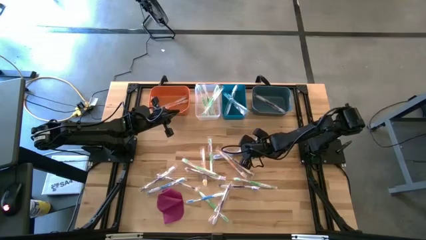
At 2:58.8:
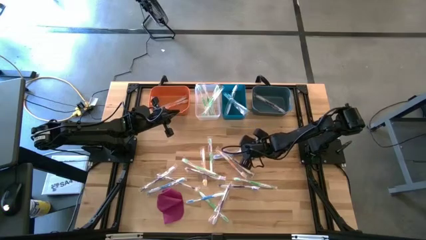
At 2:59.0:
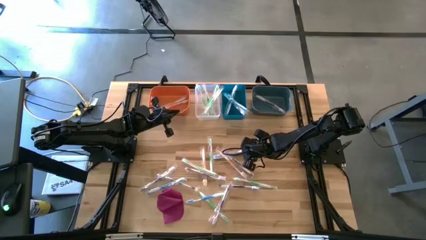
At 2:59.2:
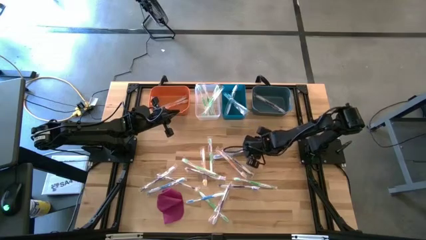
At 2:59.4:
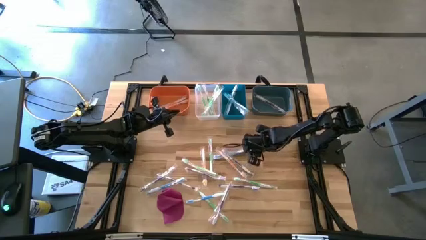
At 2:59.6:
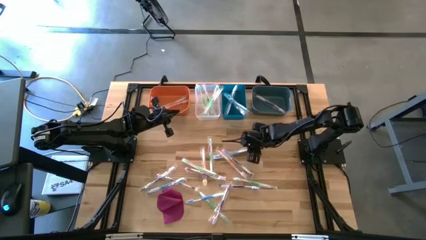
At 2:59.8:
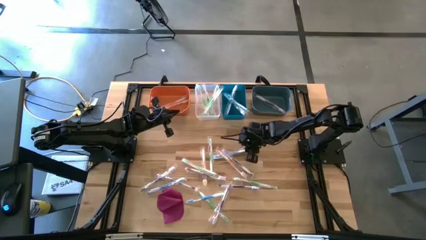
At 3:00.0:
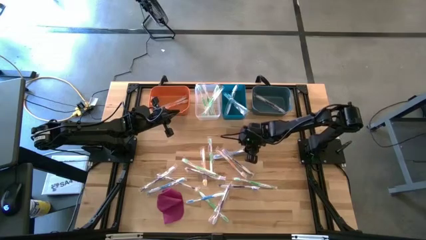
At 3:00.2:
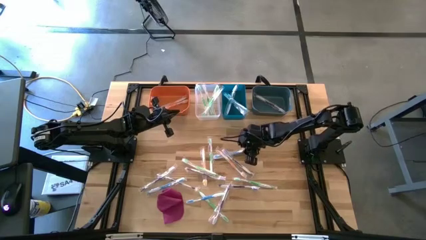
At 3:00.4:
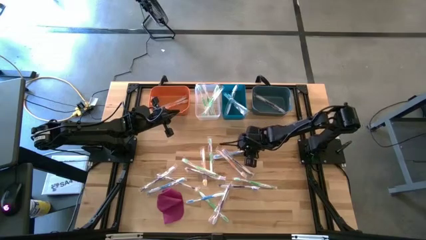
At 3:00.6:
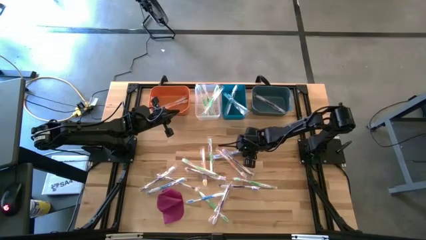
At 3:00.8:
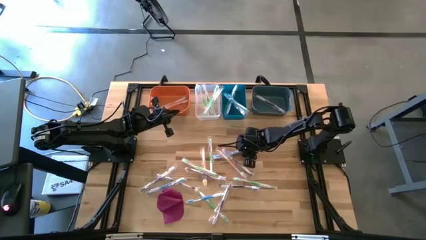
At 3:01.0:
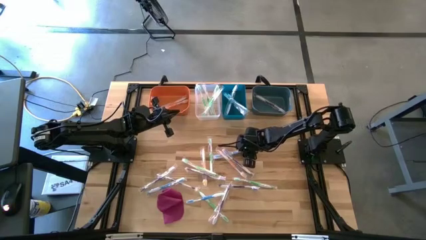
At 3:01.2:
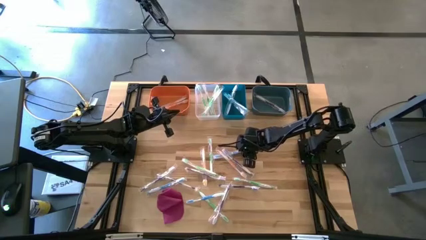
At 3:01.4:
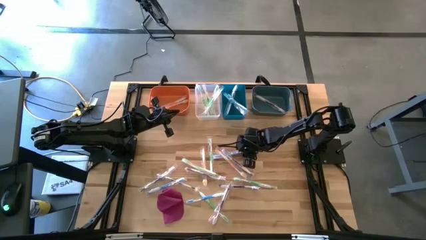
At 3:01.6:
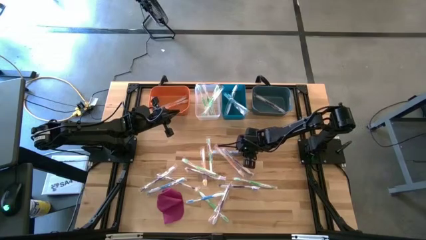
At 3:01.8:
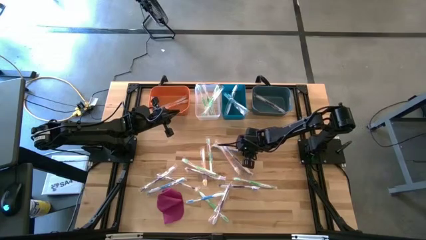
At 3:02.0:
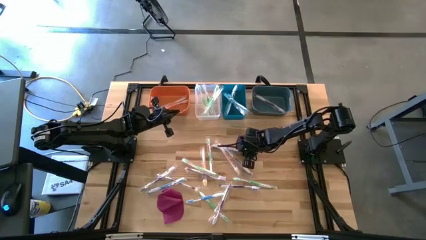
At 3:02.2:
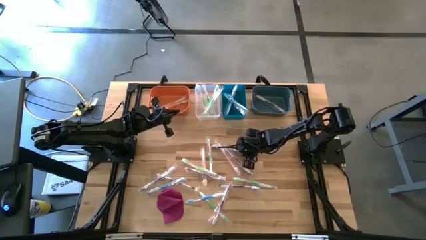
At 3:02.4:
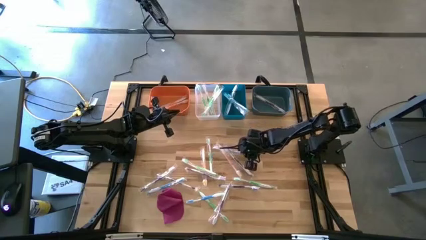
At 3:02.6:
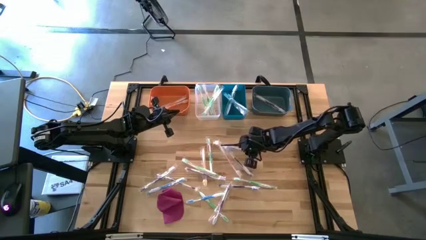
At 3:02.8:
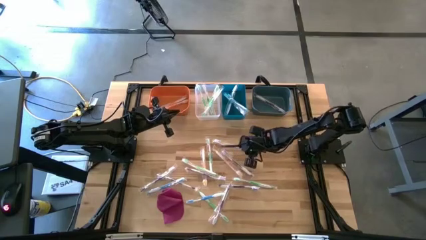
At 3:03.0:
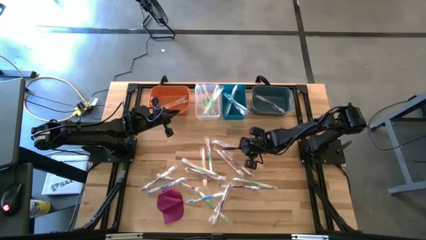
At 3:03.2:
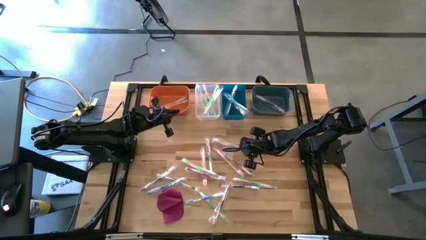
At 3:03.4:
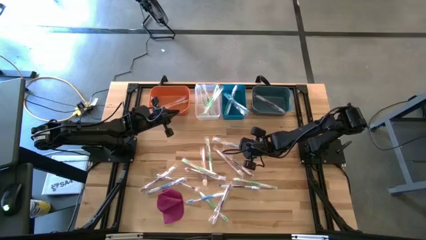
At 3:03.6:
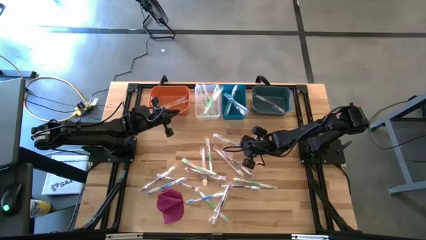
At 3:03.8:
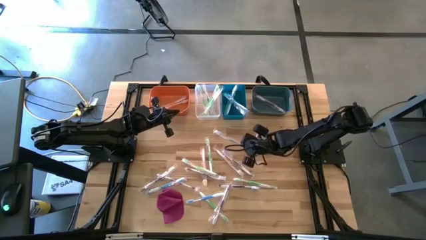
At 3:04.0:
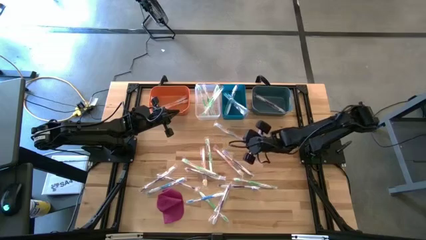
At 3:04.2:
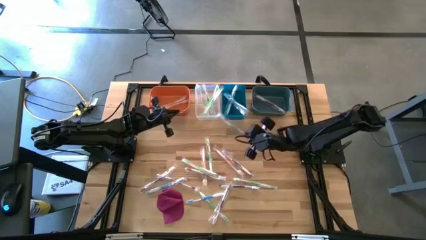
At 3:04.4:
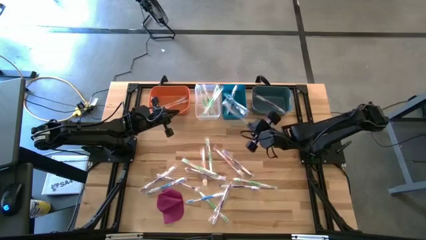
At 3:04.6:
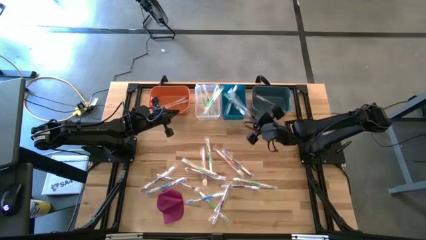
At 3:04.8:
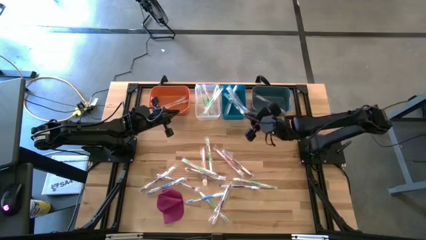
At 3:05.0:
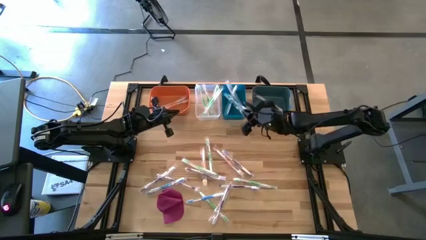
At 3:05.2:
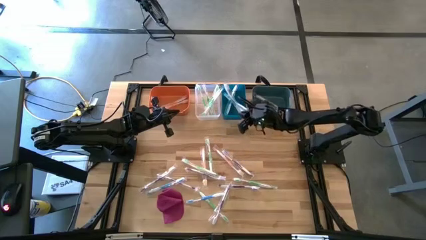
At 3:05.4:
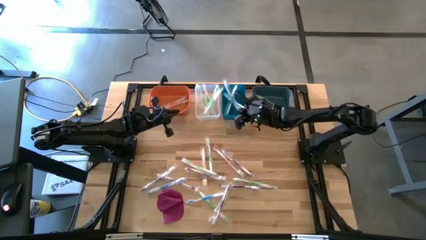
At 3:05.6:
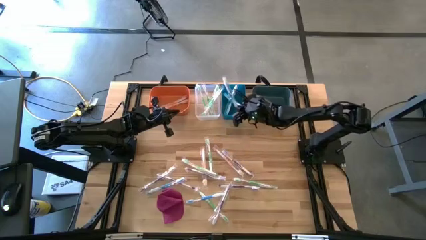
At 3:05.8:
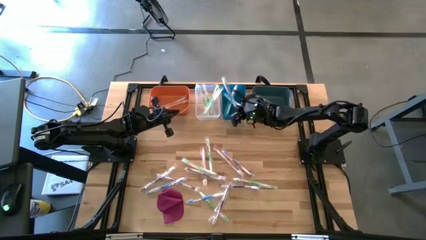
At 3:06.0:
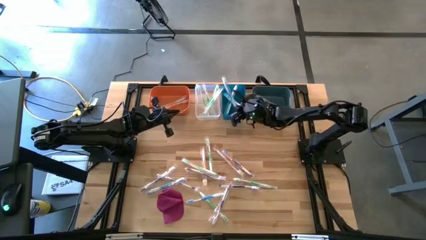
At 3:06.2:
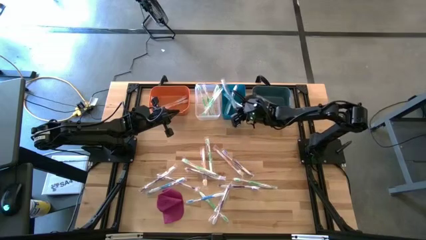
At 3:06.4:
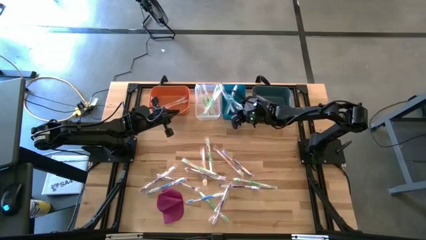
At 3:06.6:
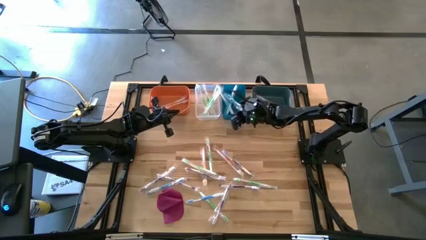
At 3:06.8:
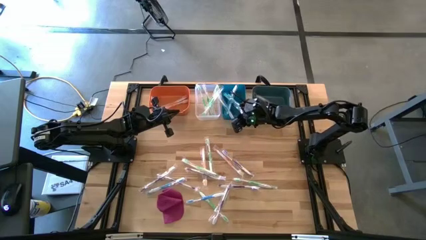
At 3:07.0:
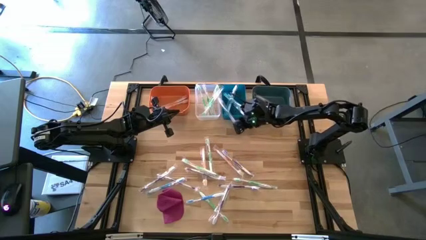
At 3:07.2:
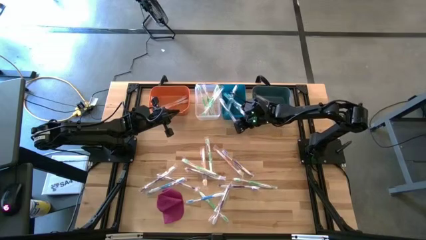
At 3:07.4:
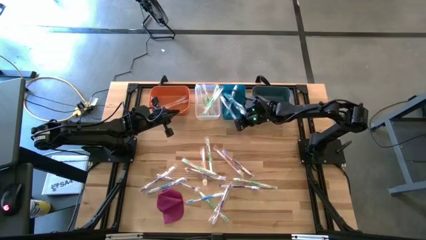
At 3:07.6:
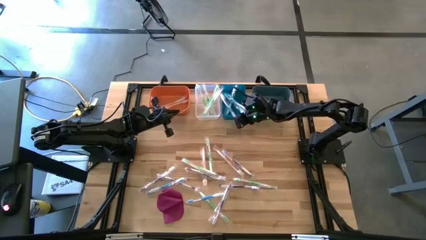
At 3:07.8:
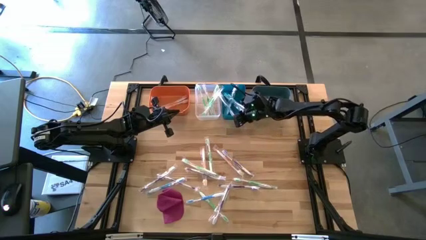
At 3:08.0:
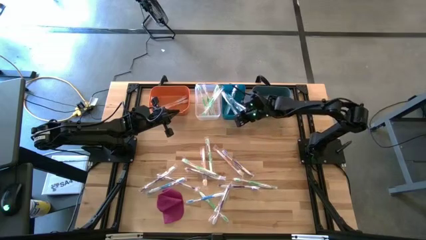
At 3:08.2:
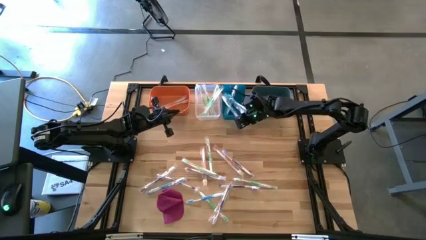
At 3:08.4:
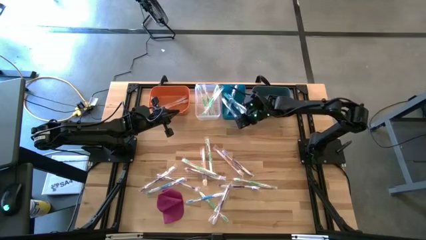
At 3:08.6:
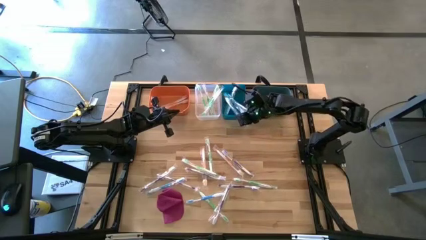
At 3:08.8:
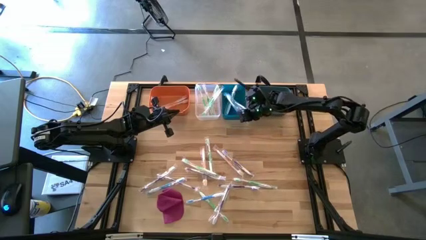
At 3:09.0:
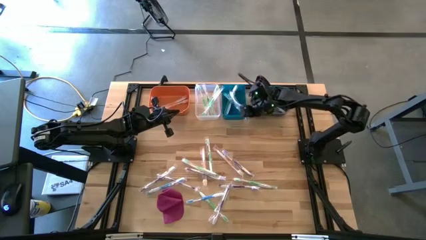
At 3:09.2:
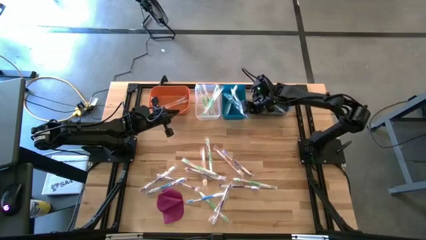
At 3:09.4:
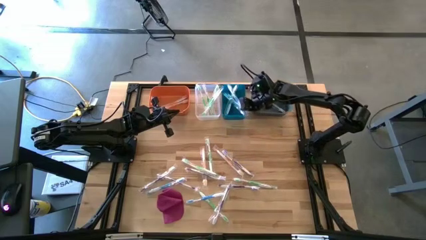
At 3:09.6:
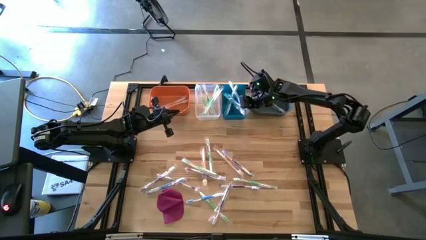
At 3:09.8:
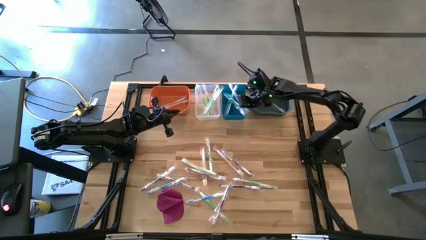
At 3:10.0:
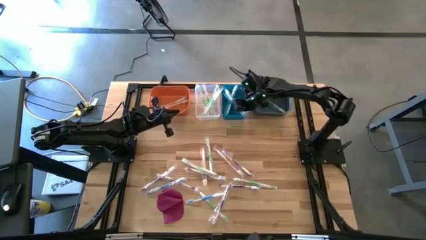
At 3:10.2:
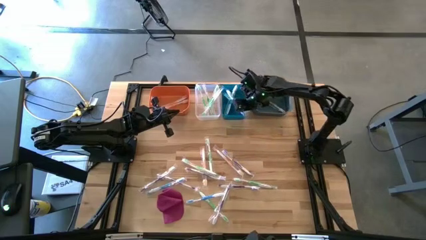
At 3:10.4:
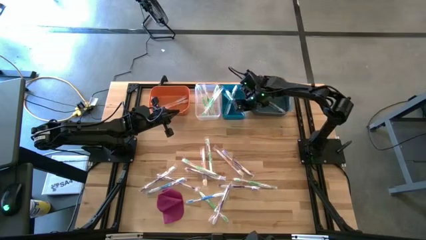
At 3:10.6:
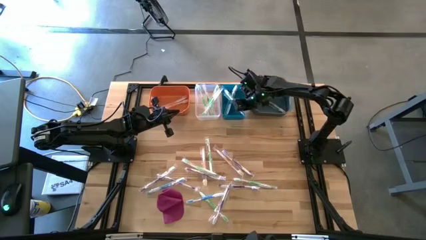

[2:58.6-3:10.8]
Task: Pick & Place Toothbrushes
Put the blue toothbrush into the blue bin
